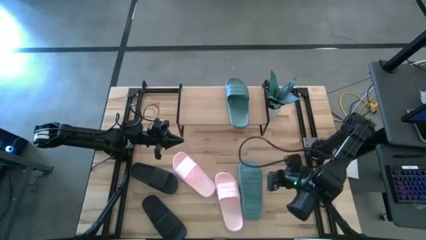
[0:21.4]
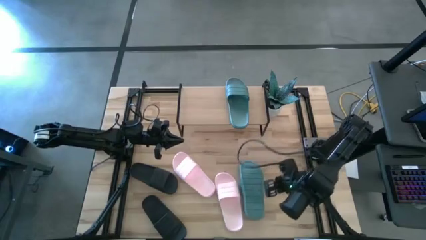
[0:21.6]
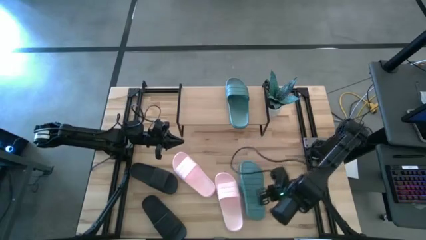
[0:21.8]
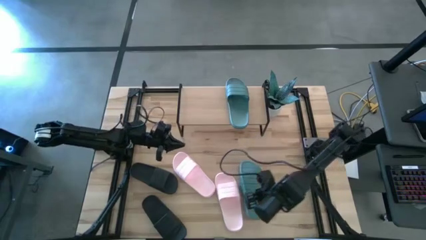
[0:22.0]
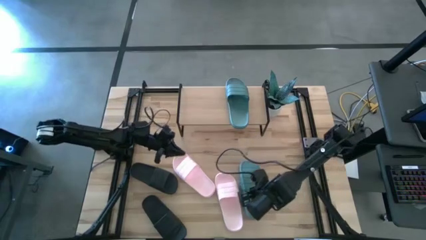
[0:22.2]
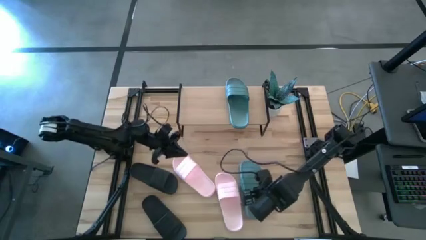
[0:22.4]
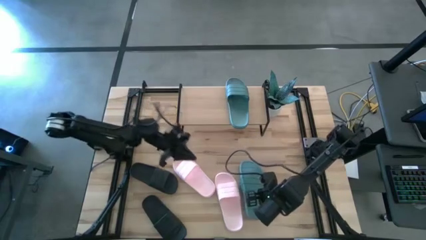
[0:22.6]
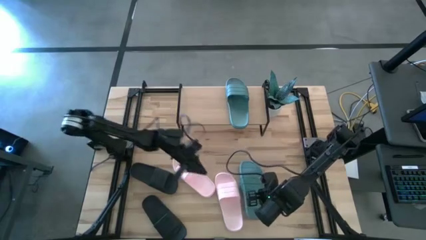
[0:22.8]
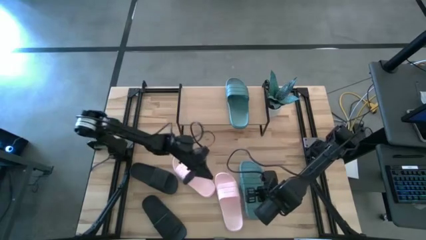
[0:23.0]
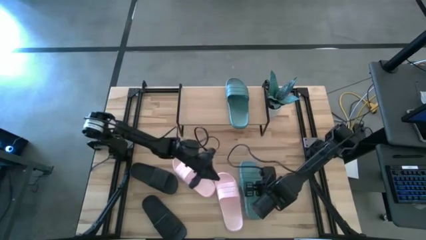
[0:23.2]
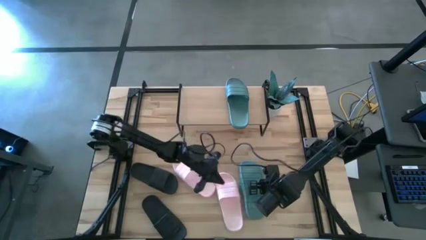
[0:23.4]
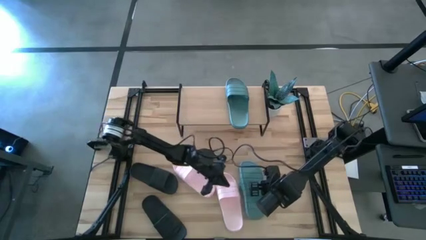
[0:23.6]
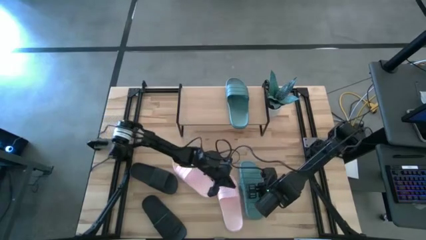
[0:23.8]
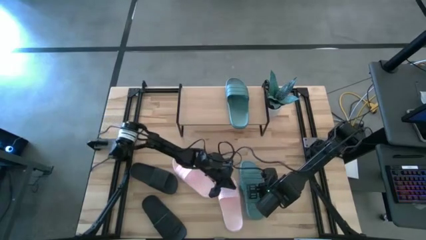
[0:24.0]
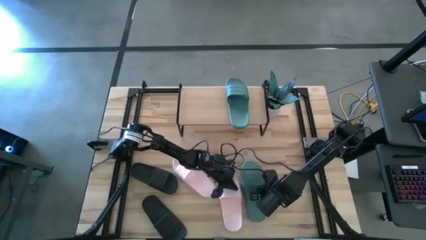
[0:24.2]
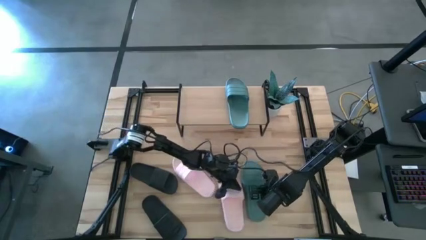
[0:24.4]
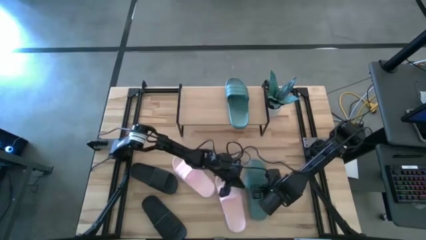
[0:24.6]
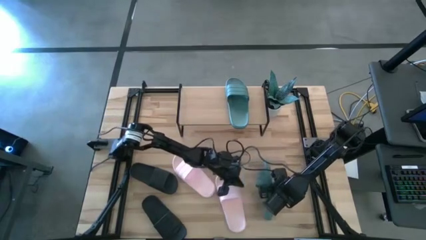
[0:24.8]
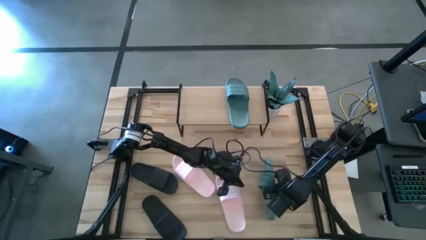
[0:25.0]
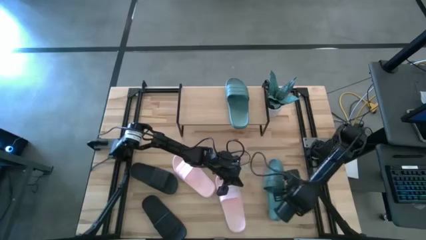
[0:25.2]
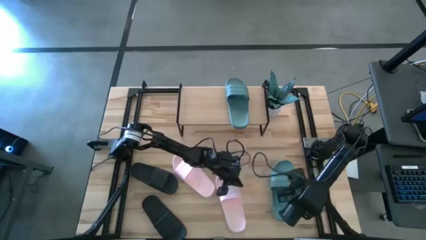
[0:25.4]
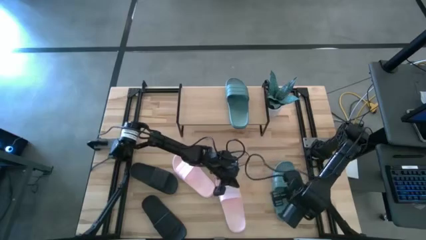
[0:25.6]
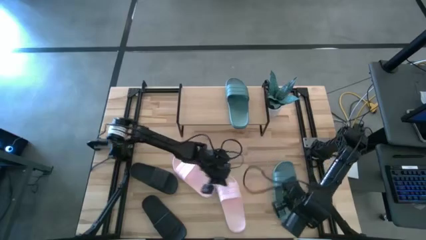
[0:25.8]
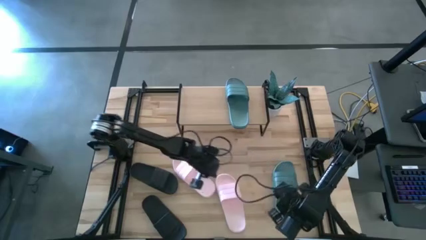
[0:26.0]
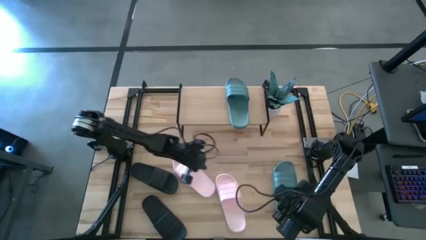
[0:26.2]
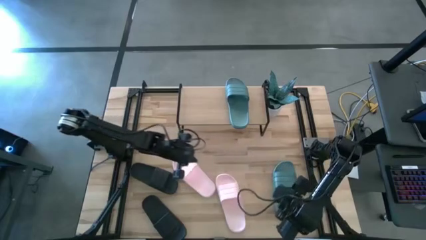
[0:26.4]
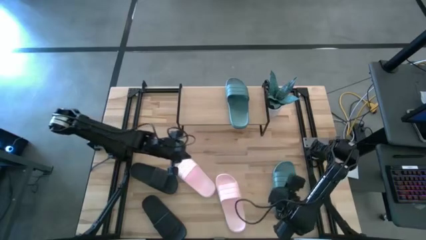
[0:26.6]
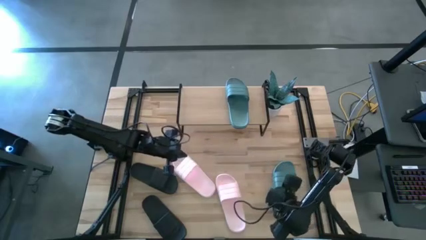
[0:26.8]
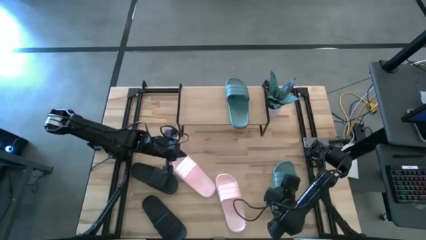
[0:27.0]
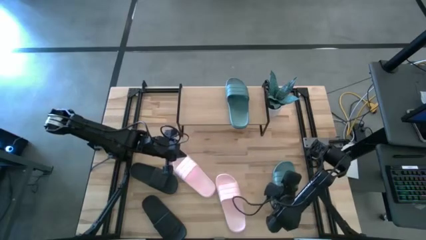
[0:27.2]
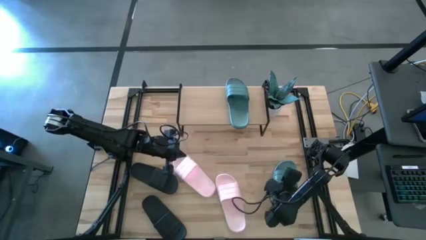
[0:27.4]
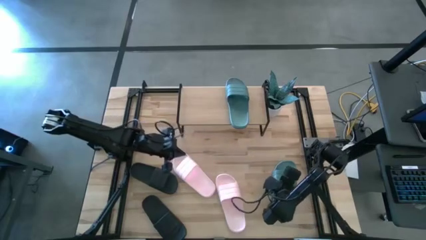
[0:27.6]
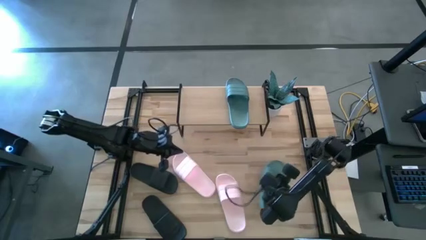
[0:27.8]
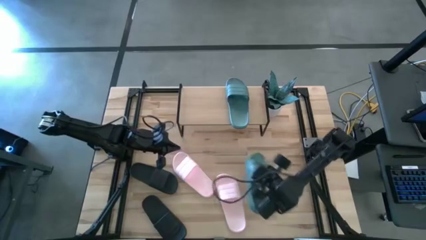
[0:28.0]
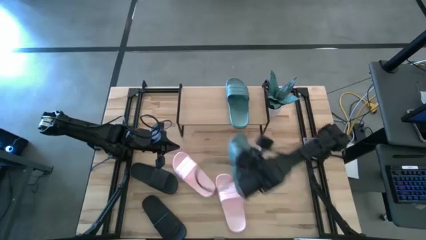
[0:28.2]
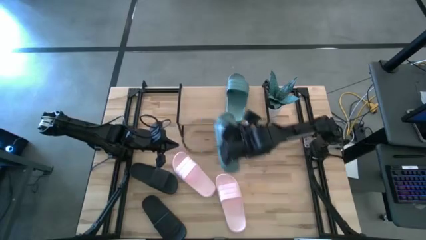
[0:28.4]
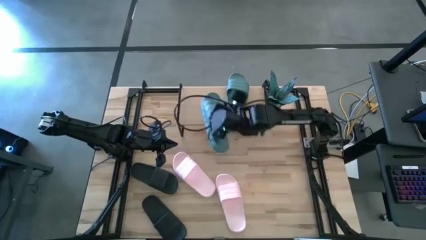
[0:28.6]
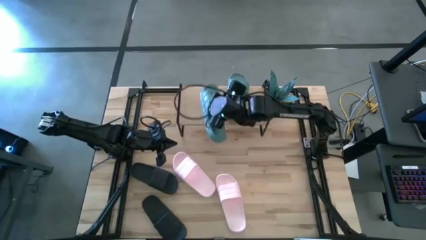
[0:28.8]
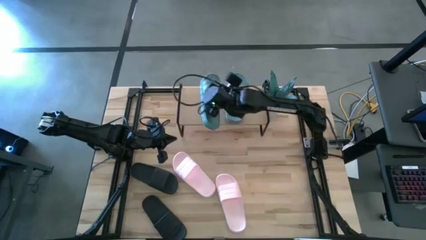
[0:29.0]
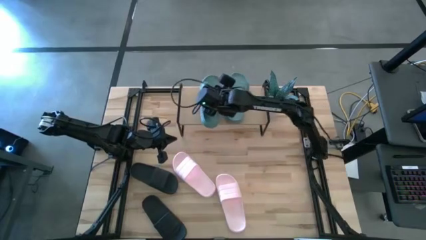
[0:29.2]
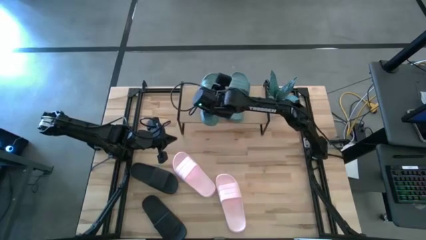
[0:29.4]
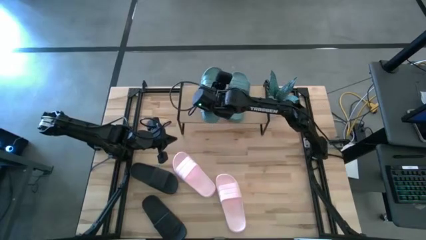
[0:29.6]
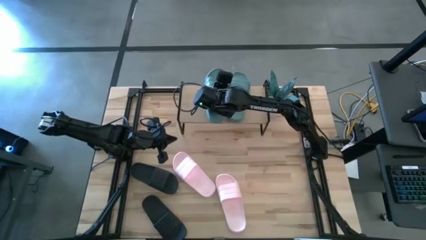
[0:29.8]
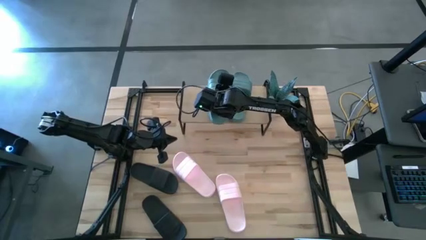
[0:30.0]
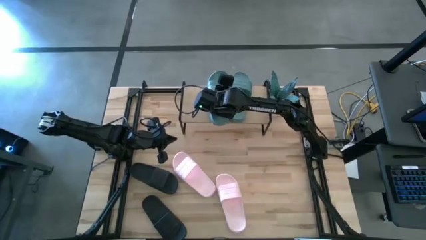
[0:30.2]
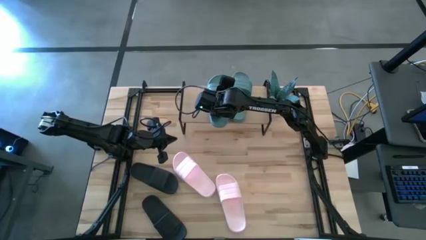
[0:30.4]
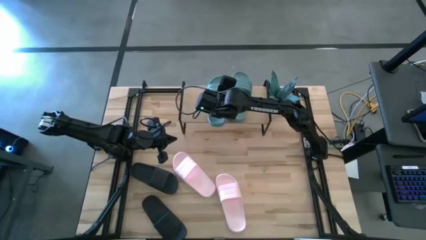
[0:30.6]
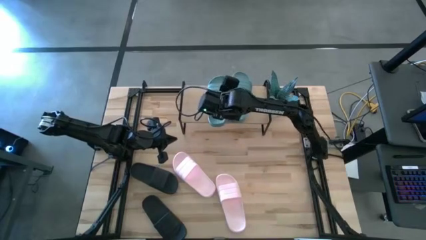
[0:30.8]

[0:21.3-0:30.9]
Task: Pick and place slides into the shelf
Put the green slide on the shelf

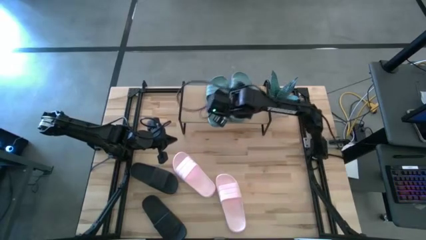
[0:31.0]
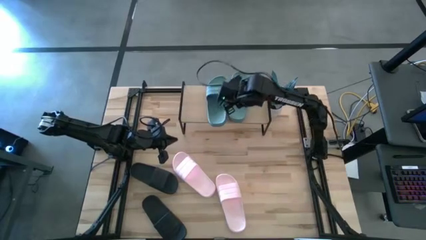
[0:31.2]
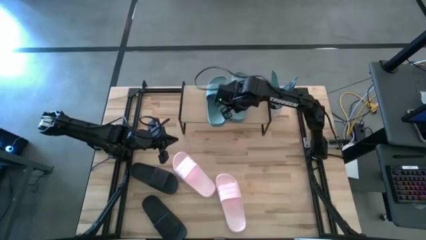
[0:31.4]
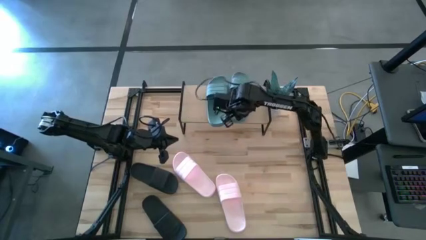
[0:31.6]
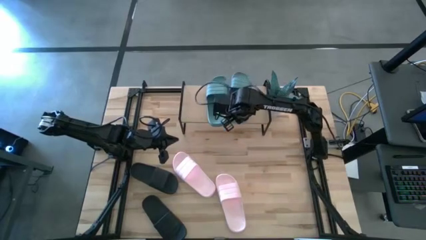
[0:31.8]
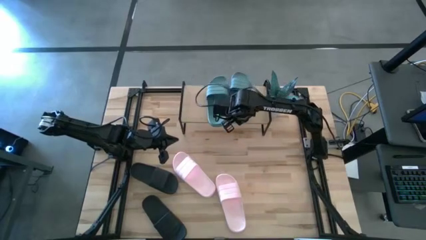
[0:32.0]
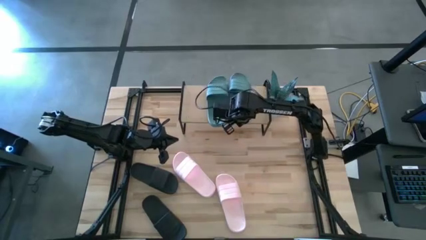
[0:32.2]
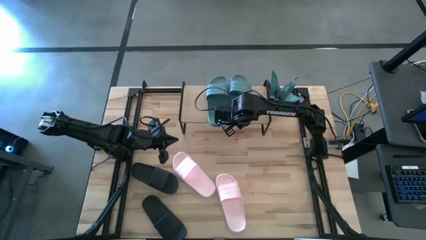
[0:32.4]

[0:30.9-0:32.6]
Adjust the green slide on the shelf
